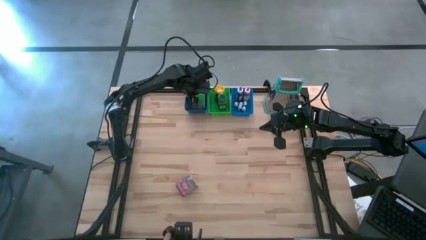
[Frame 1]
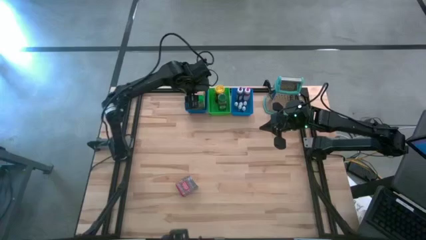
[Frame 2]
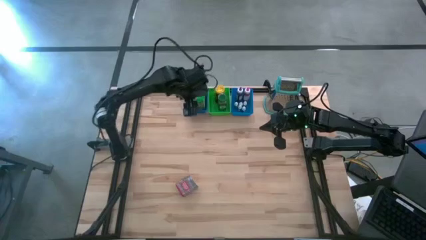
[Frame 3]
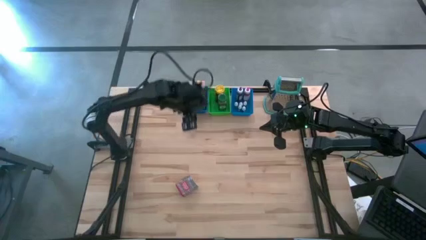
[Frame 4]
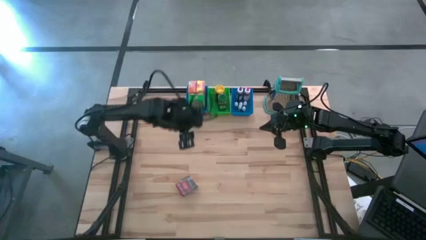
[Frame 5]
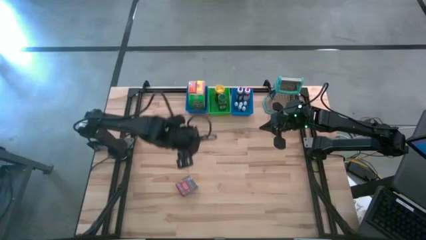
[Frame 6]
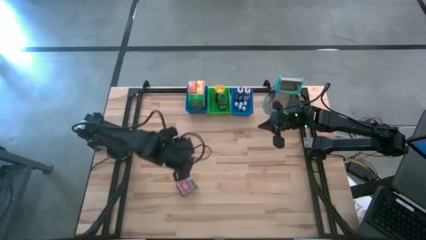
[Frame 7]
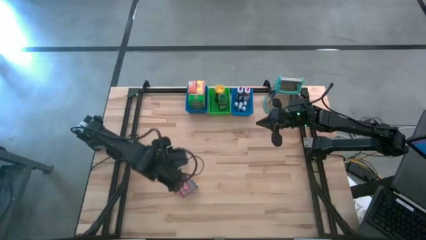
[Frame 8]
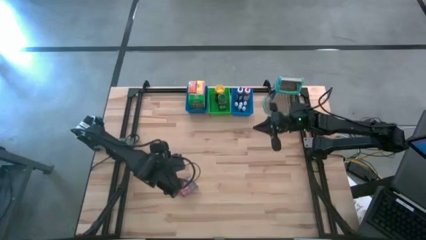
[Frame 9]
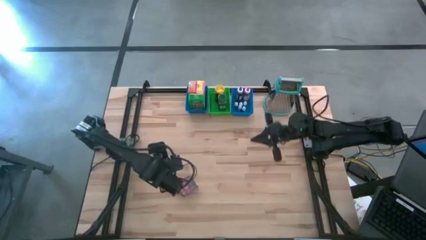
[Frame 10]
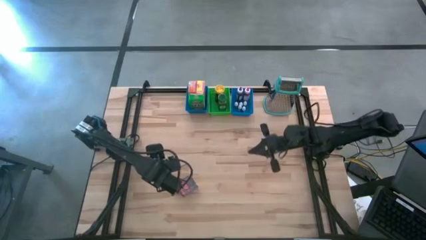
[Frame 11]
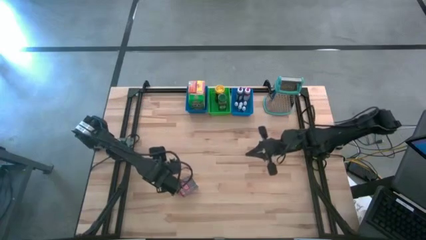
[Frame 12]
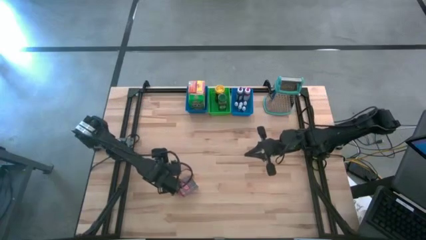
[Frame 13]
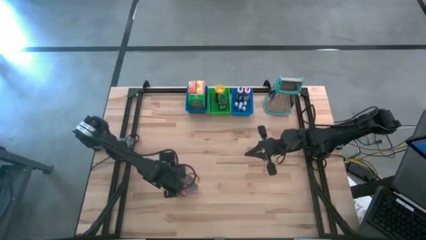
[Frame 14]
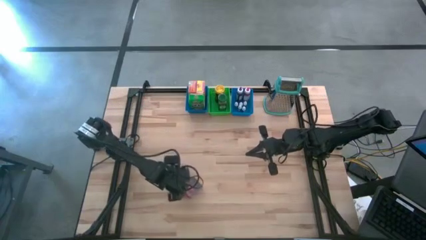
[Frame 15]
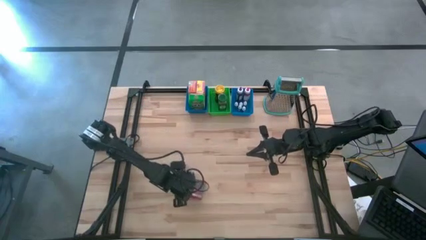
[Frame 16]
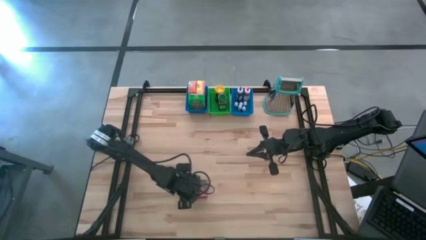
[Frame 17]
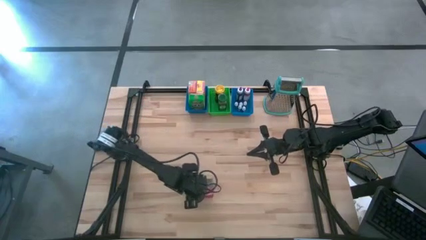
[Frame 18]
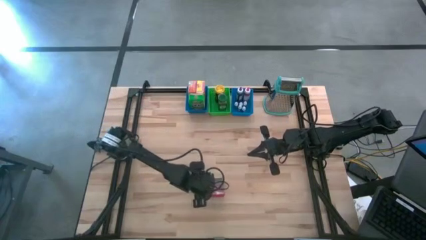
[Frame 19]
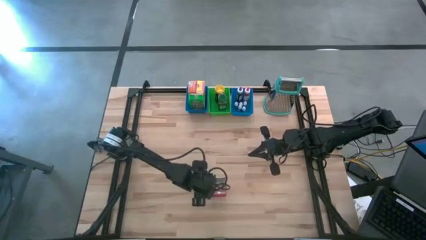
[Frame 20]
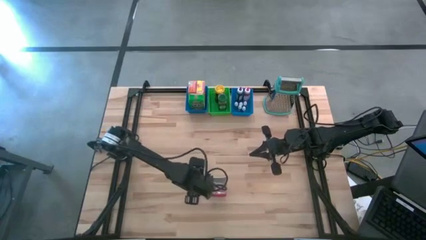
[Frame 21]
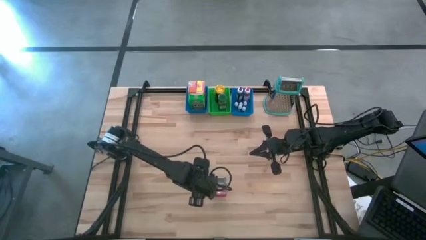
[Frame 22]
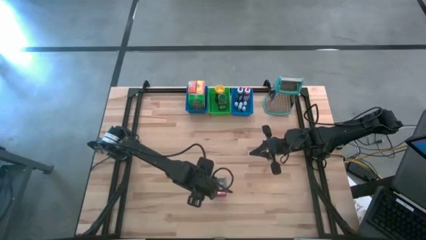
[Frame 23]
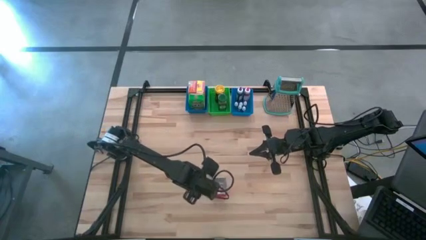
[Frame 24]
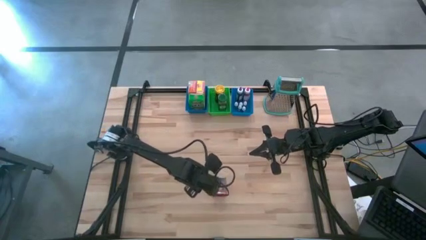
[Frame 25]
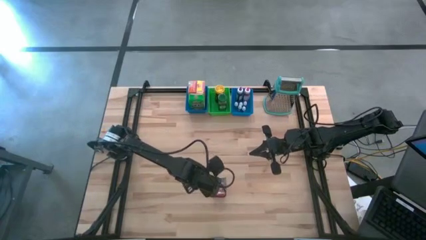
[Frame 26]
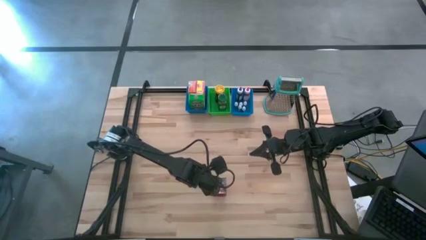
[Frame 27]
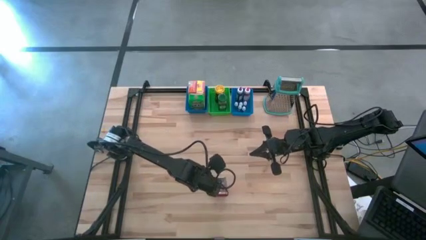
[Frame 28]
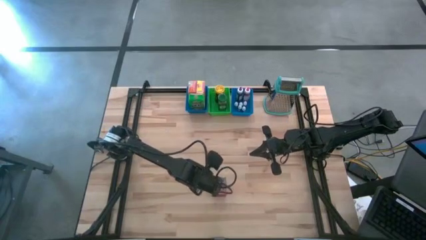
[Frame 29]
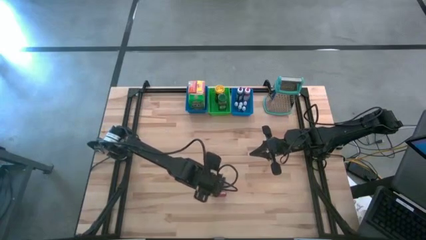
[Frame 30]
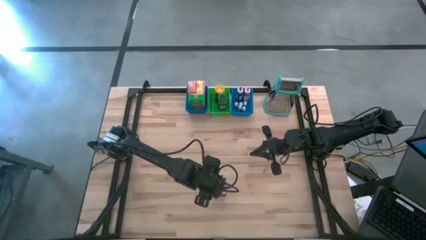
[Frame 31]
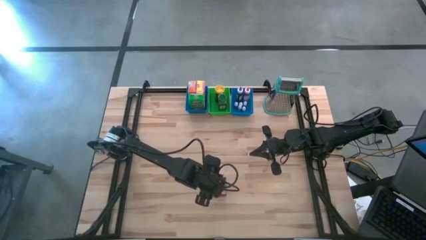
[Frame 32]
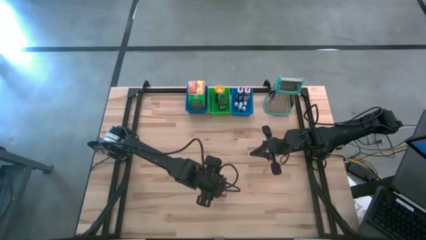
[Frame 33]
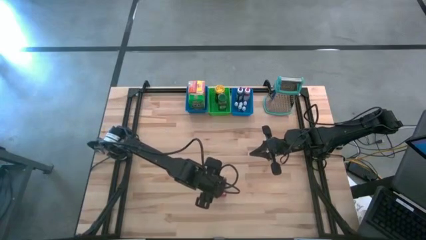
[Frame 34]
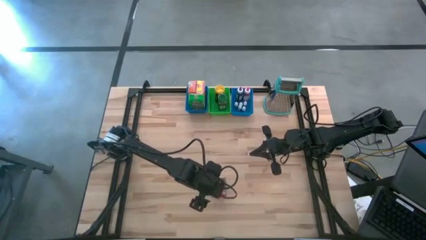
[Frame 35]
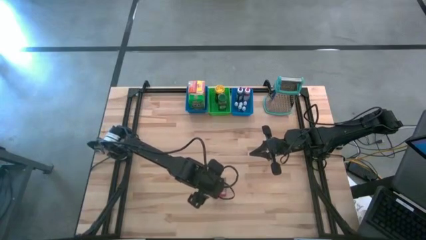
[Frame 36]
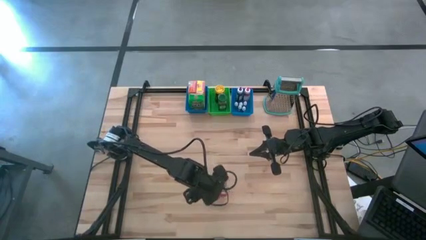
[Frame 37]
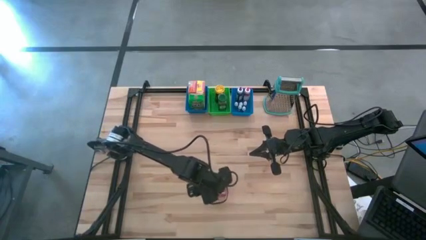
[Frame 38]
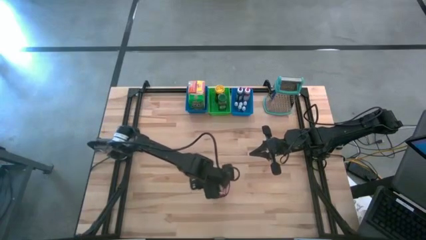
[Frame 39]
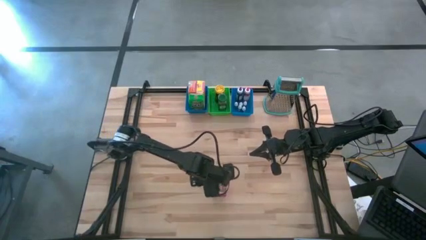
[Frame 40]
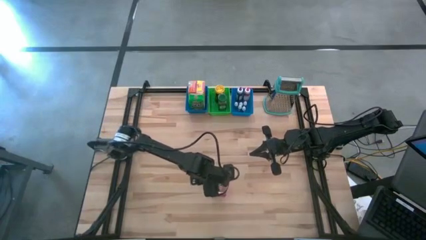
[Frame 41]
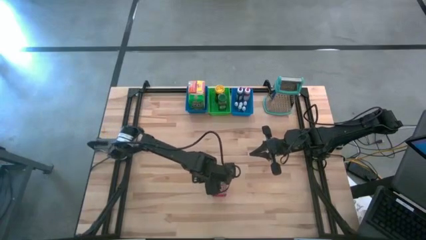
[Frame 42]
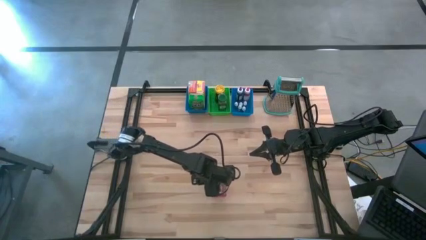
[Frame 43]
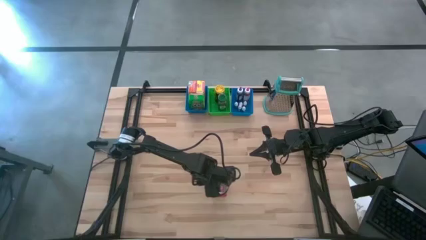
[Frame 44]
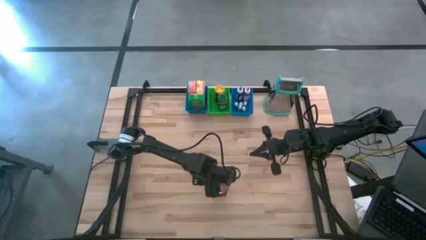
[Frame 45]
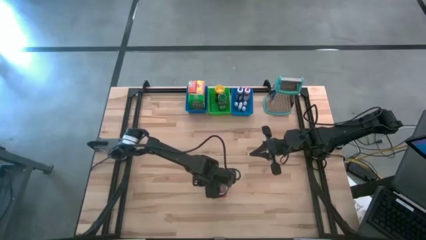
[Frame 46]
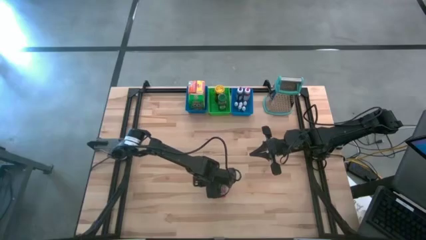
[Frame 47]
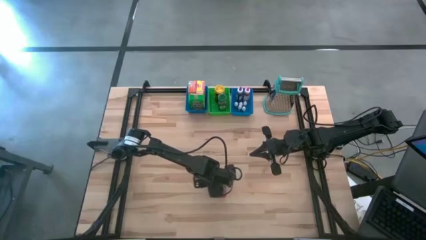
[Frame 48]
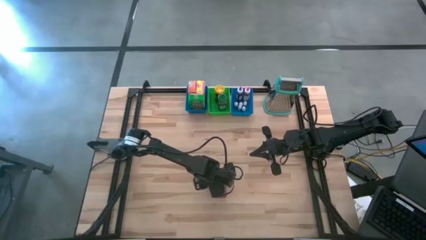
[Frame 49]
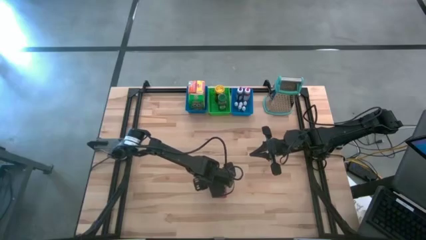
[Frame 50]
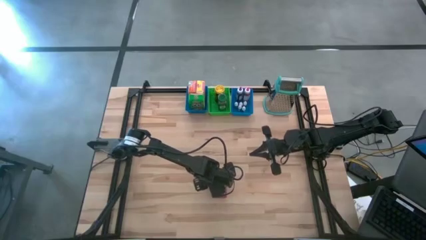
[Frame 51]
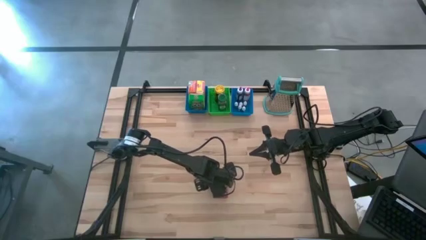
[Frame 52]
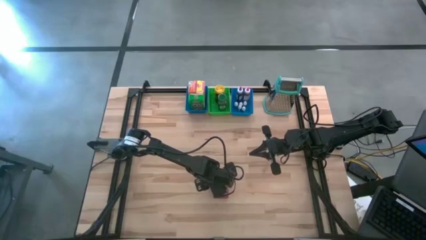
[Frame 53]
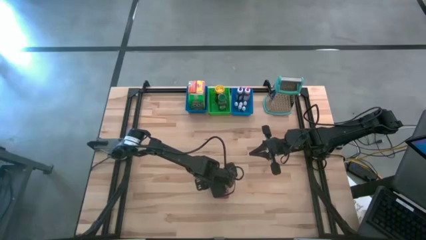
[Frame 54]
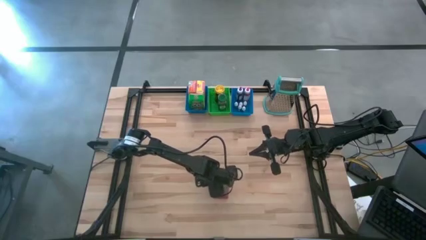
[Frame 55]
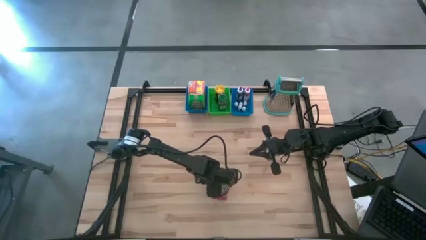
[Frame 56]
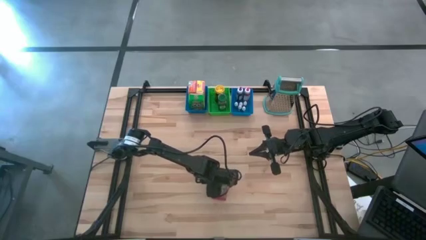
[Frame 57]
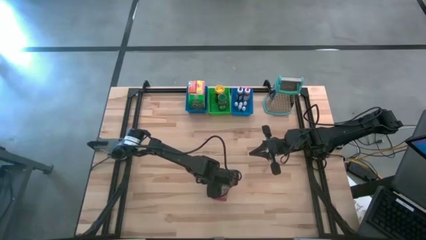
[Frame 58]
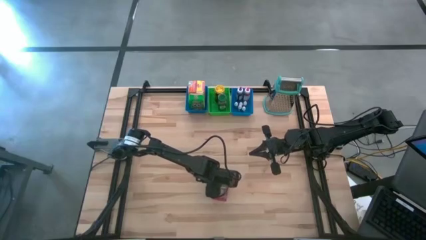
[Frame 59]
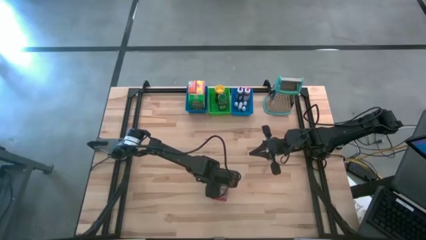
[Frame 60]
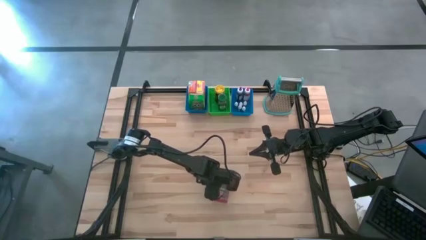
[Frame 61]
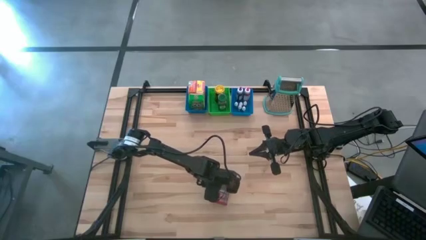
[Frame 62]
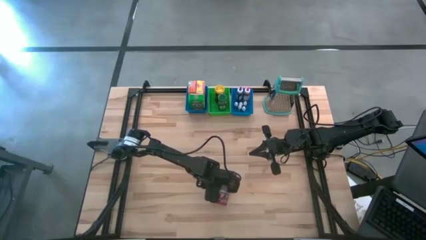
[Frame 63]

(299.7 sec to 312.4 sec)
Task: Pick & Place Kitchen Items
Put the red seasoning can into the green bin

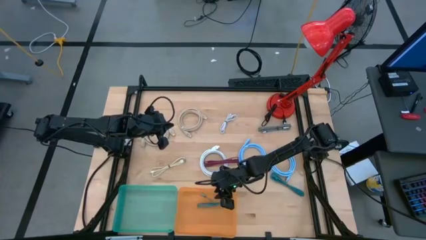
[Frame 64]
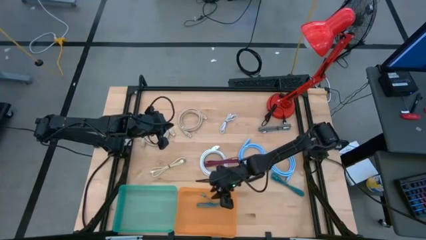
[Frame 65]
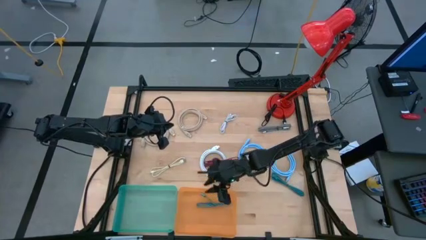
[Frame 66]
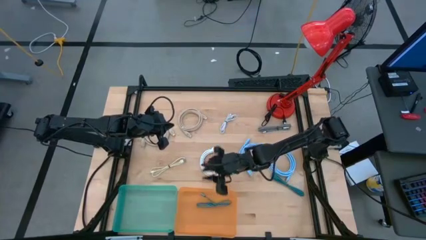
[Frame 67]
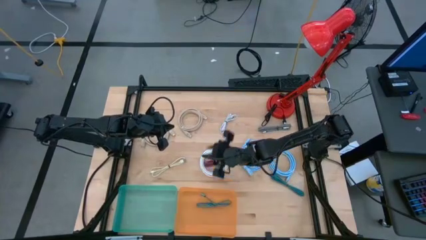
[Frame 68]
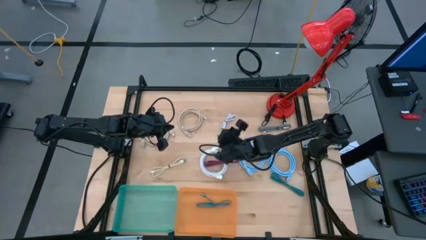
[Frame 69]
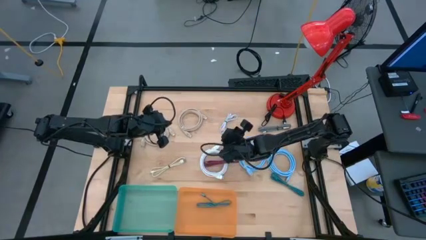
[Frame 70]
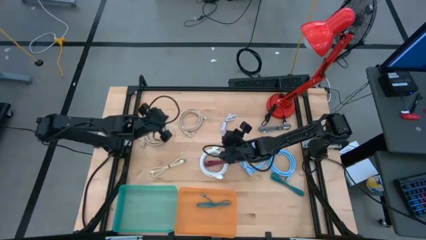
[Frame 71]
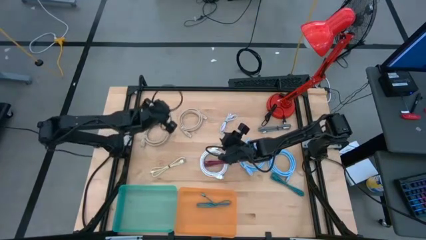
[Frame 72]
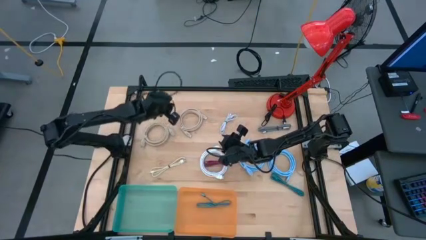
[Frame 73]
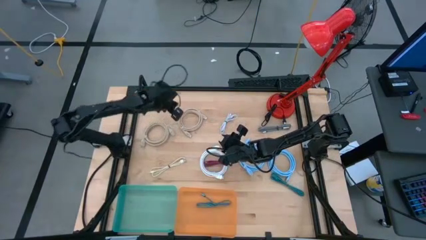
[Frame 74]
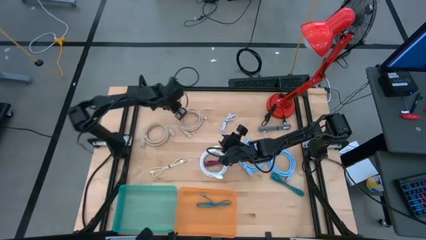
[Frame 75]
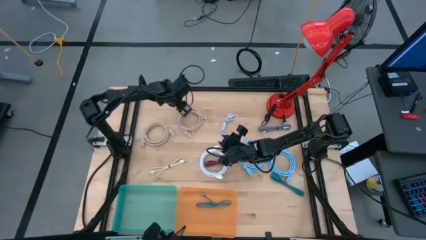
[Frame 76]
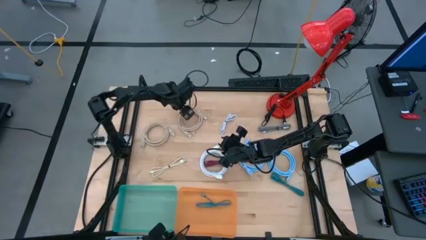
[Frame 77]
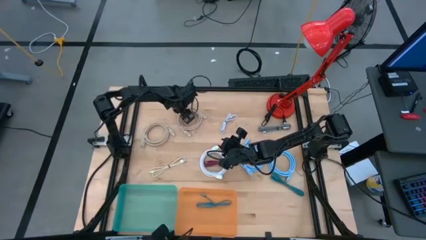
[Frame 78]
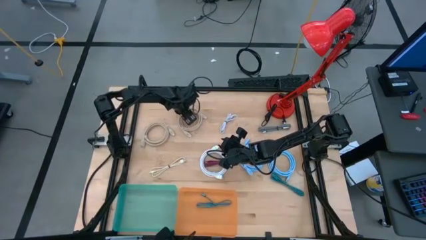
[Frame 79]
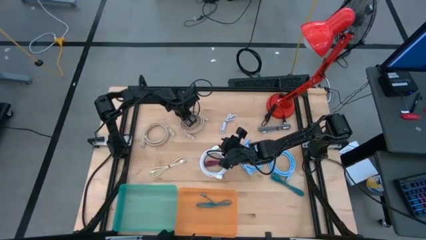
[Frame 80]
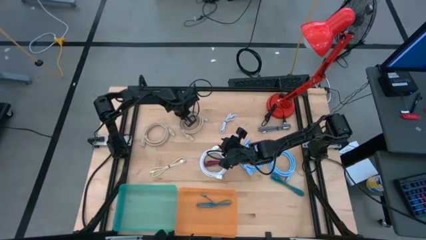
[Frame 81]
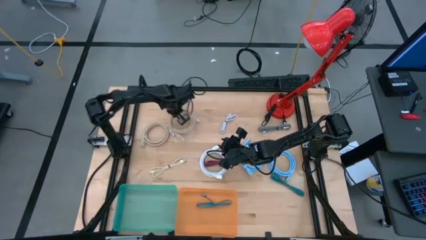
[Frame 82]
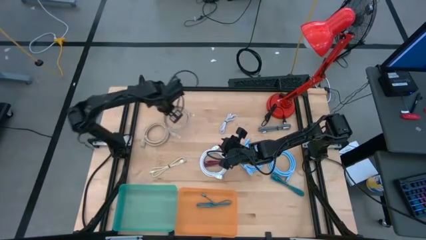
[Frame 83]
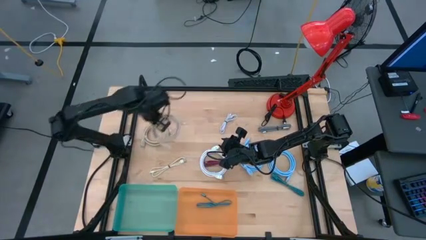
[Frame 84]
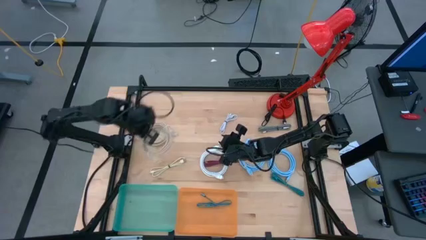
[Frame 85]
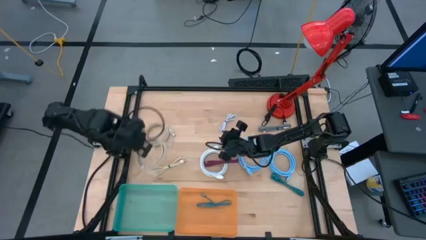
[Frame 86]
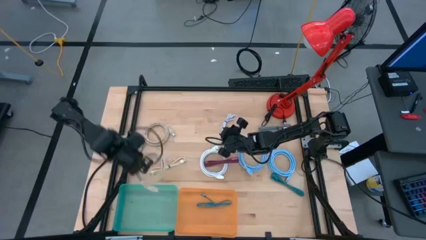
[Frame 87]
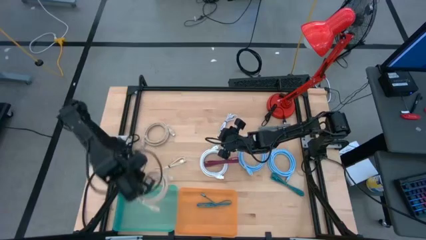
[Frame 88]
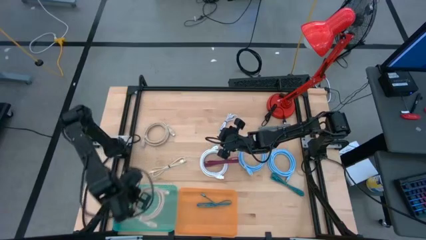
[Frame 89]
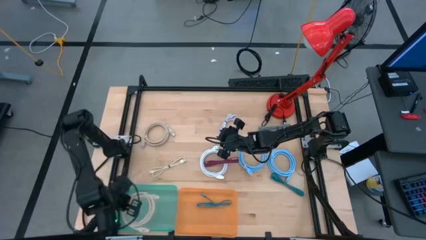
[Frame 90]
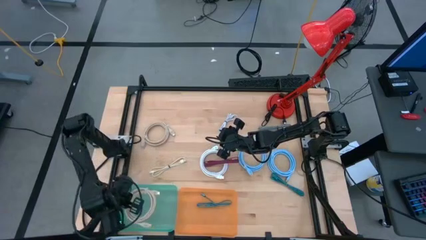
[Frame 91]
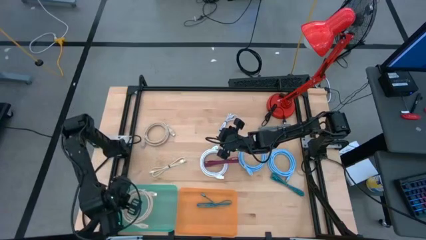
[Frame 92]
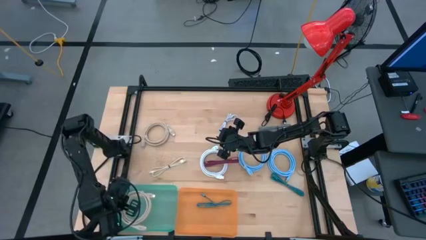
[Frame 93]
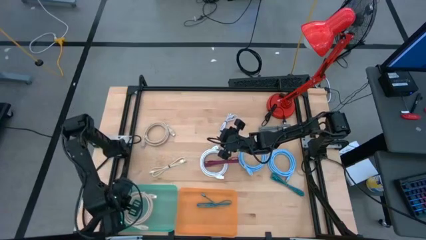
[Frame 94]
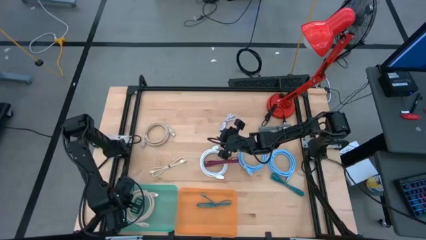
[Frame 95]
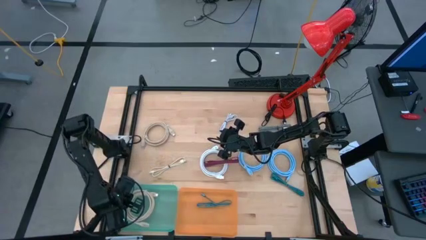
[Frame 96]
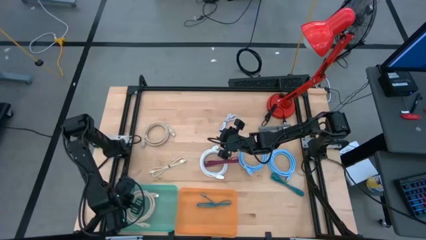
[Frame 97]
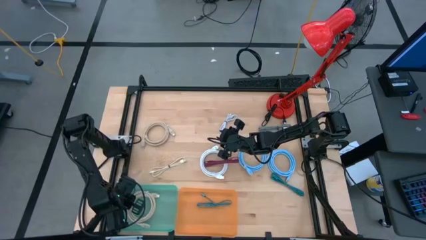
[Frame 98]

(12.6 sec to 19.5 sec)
Task: Pick & Place USB Port
Put the right brown HDMI cable into the green bin
